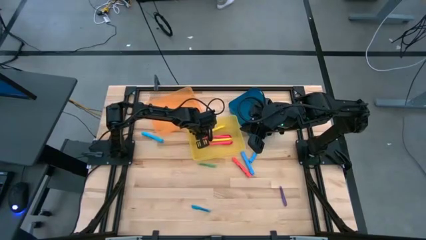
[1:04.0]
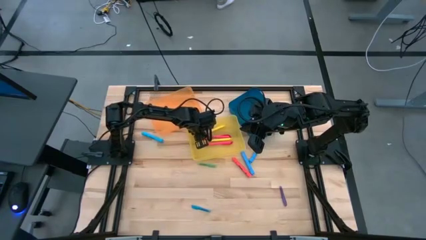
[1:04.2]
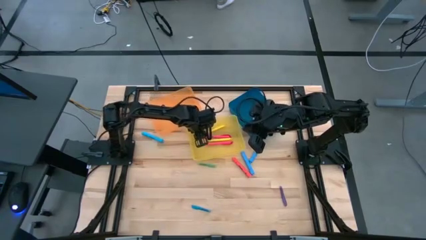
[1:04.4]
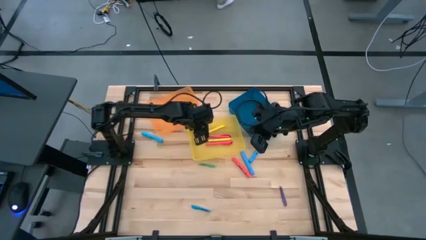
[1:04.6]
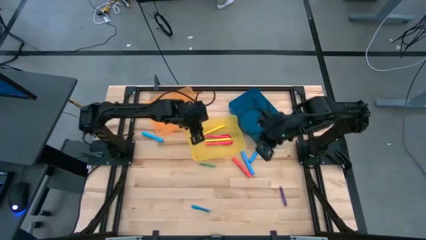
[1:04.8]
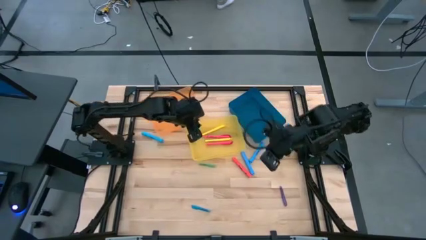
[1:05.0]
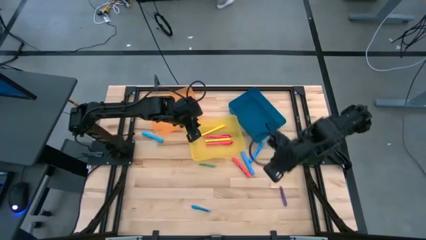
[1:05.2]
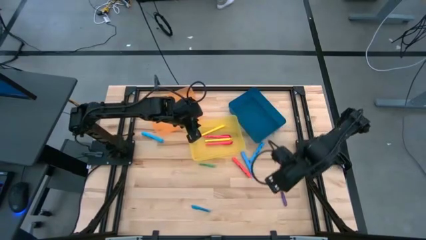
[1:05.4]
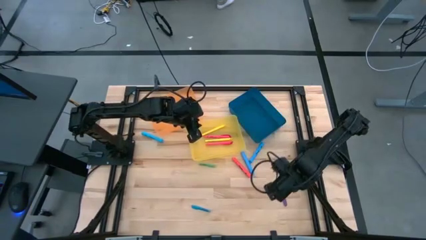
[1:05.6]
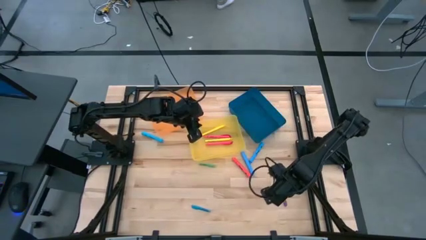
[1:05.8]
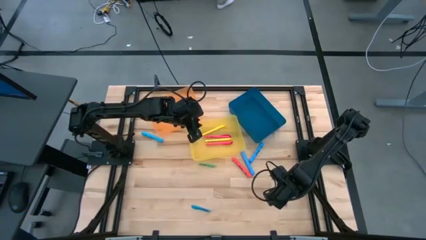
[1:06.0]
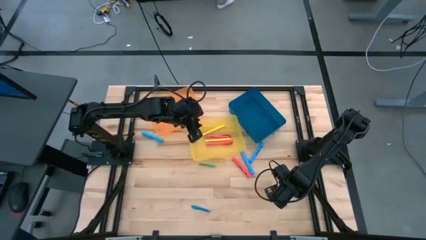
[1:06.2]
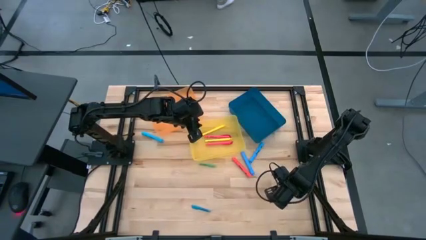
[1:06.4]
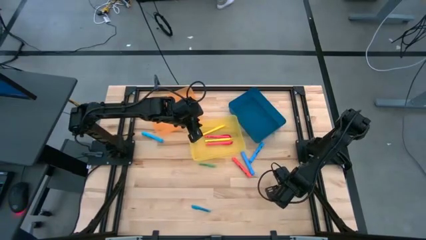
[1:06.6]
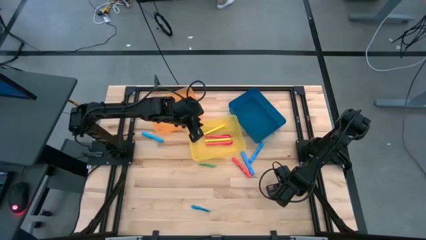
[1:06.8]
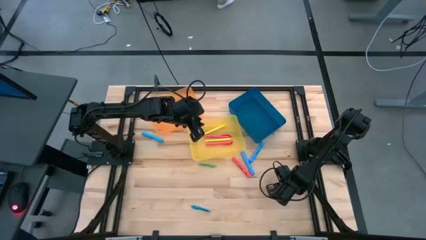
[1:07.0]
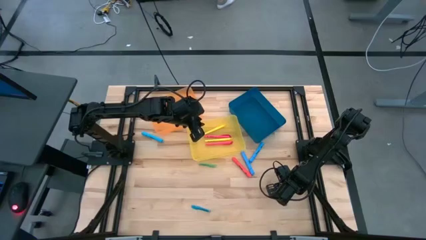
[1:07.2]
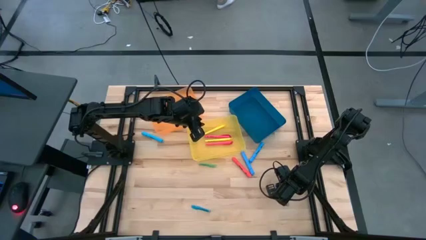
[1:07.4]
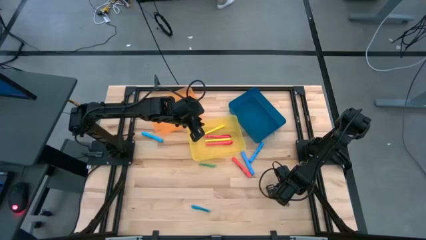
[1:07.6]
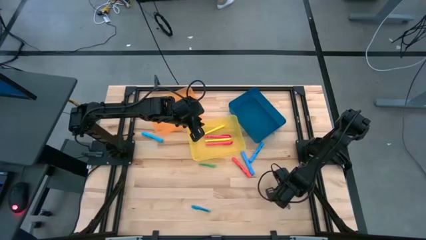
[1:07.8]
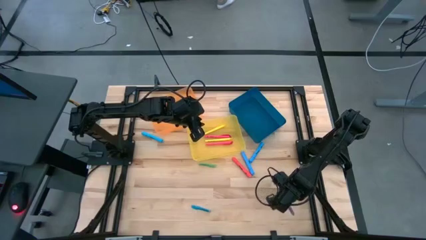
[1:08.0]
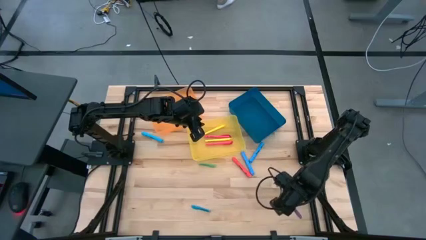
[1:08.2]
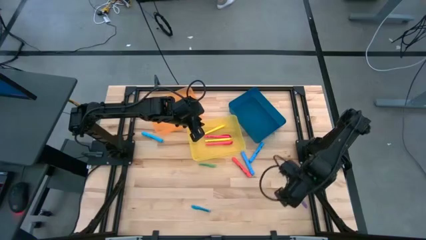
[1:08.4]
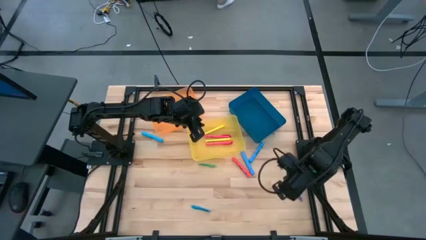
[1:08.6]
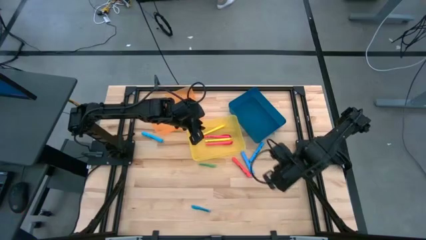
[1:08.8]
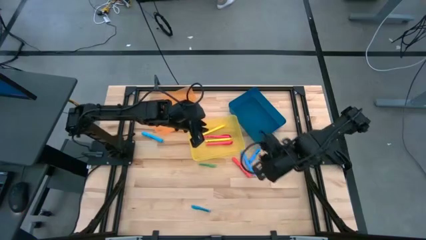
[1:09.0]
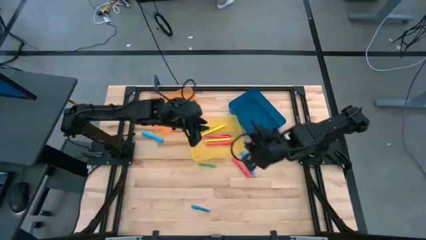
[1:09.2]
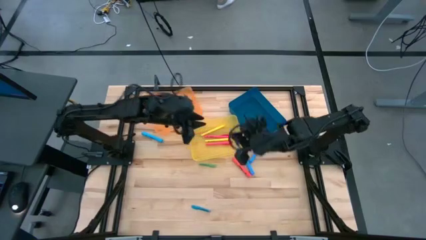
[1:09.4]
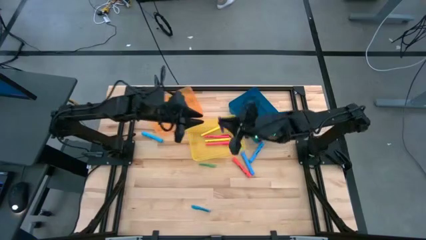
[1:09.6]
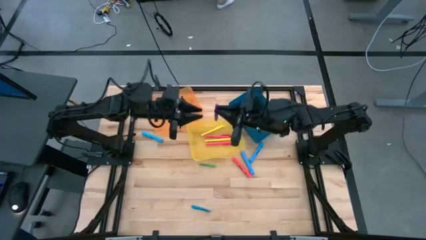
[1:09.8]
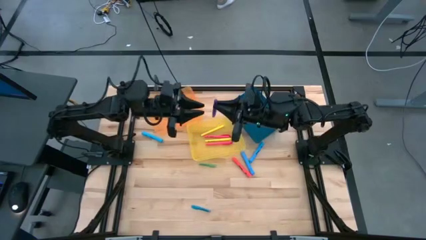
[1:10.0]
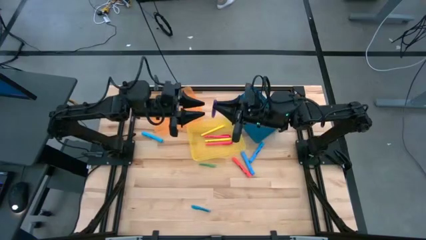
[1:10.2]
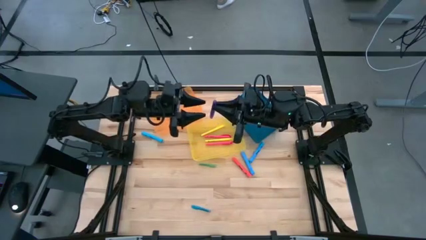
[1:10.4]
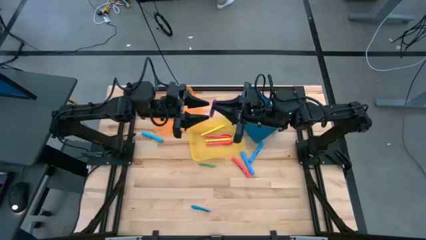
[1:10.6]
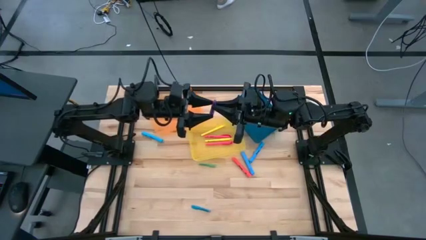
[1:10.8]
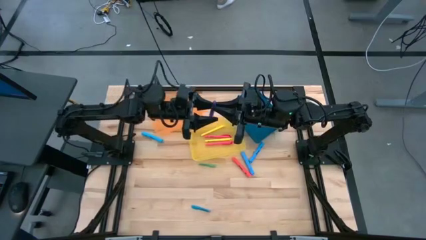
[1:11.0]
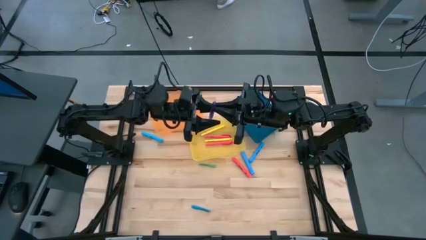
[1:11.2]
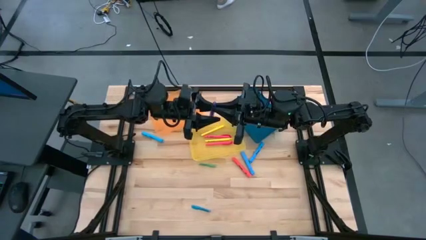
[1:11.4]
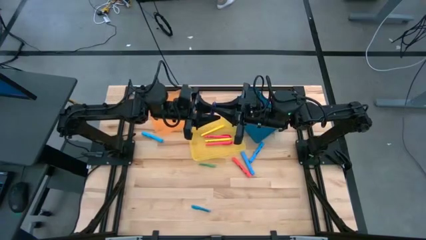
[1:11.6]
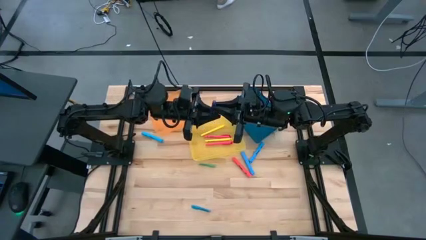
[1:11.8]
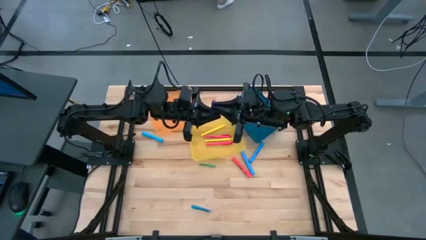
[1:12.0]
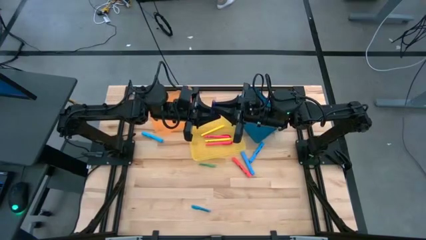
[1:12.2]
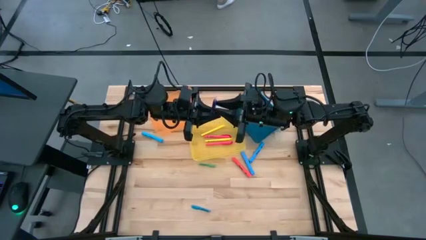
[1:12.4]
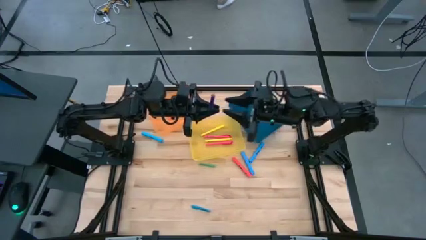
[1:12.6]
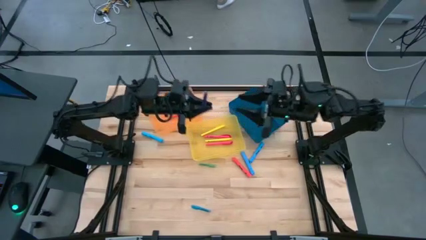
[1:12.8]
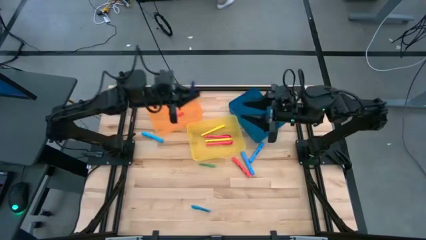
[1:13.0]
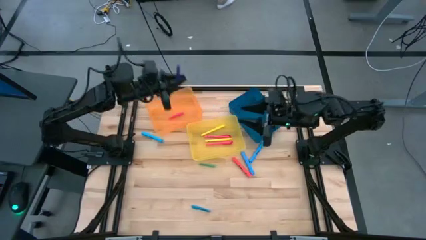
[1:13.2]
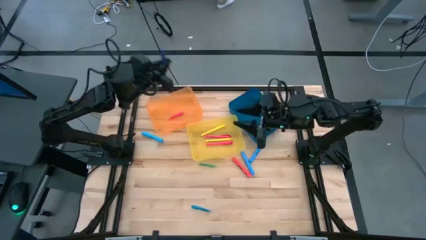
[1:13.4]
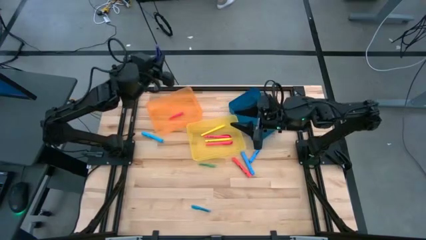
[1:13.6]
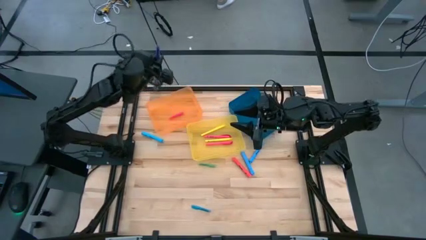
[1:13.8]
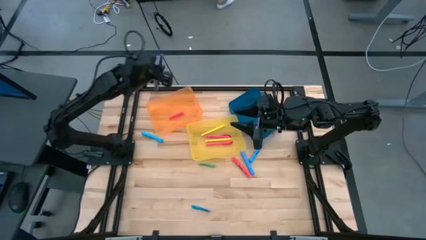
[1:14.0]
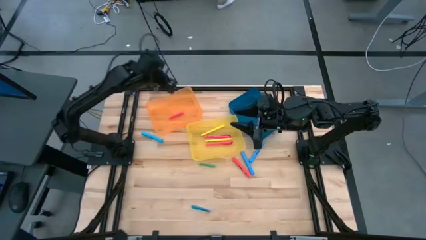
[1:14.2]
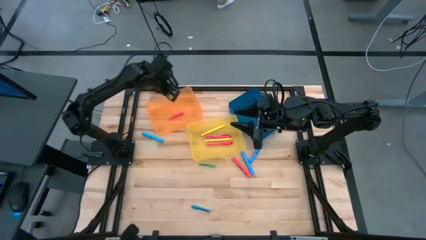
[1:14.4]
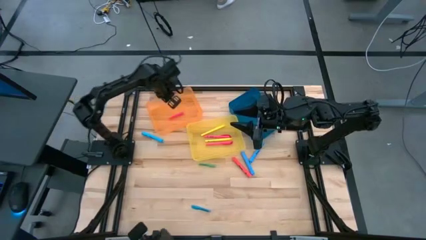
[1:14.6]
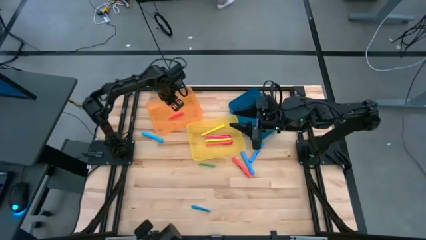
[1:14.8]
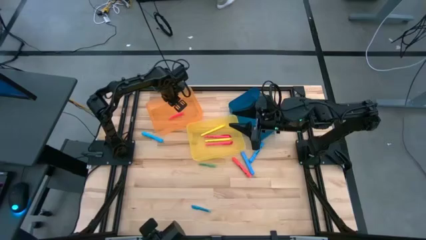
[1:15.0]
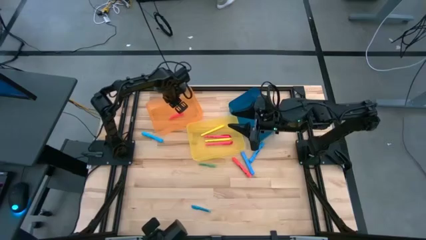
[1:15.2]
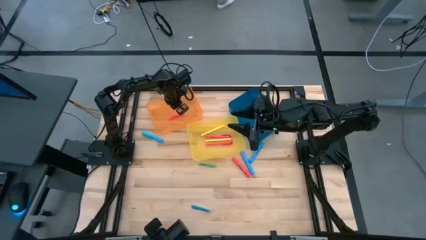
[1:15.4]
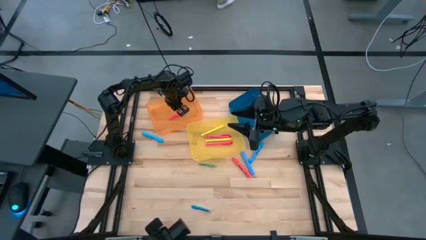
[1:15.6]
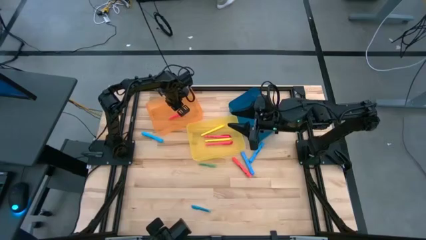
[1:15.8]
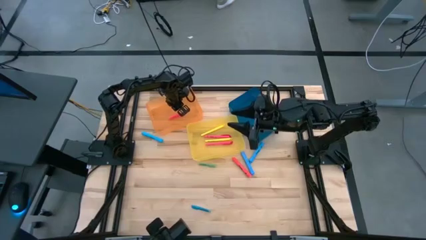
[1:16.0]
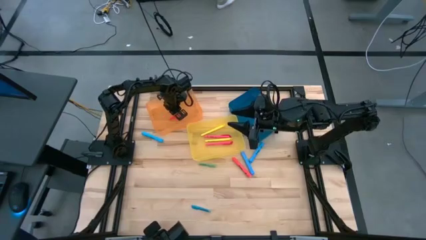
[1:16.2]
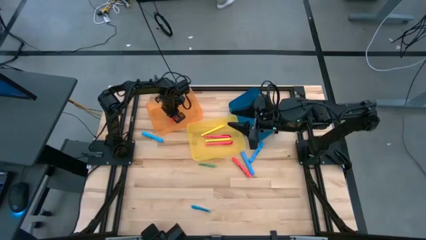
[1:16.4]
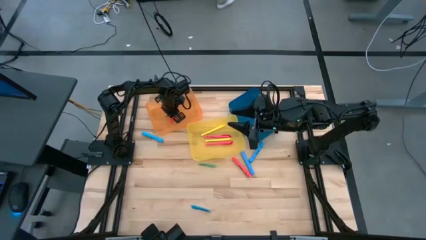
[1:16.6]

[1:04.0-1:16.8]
Task: Pick & Place Markers
Put the violet pen into the orange bin
